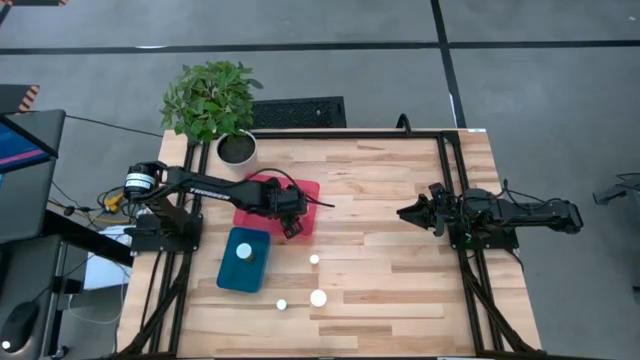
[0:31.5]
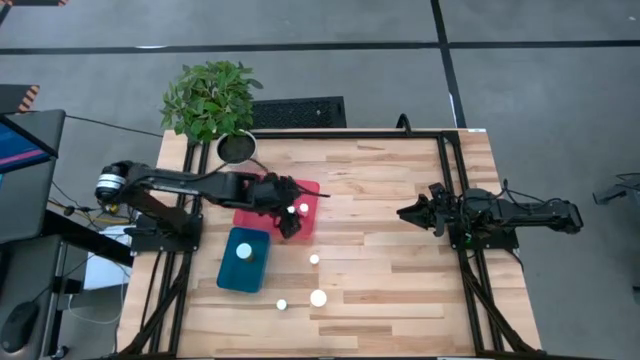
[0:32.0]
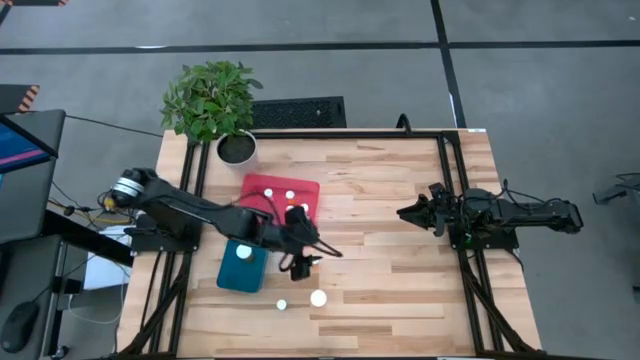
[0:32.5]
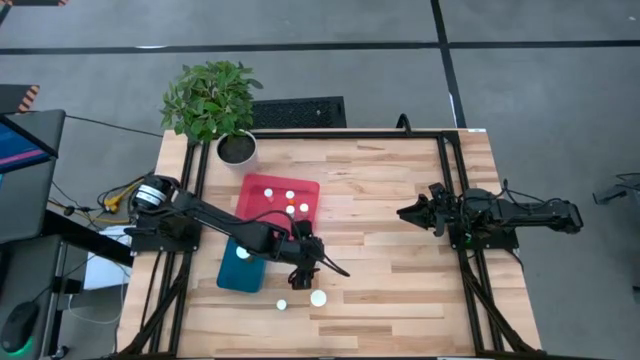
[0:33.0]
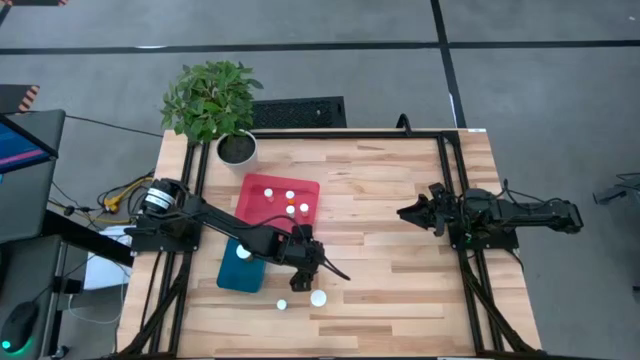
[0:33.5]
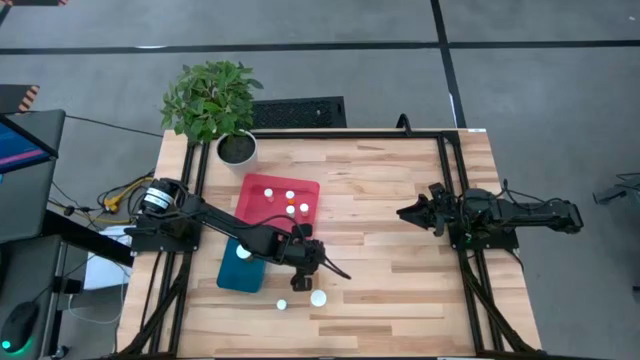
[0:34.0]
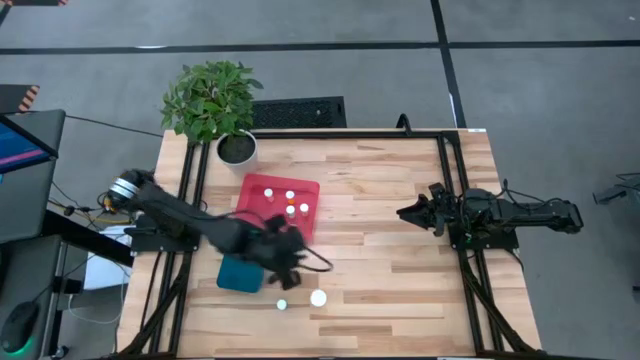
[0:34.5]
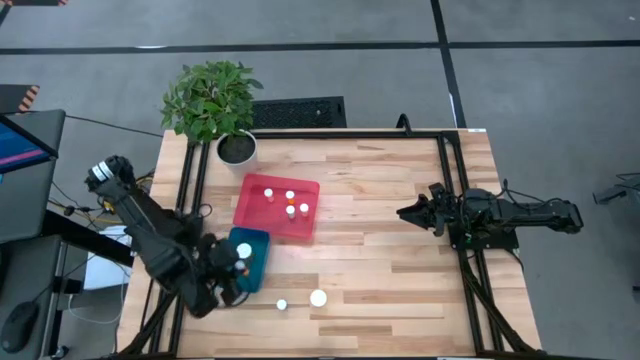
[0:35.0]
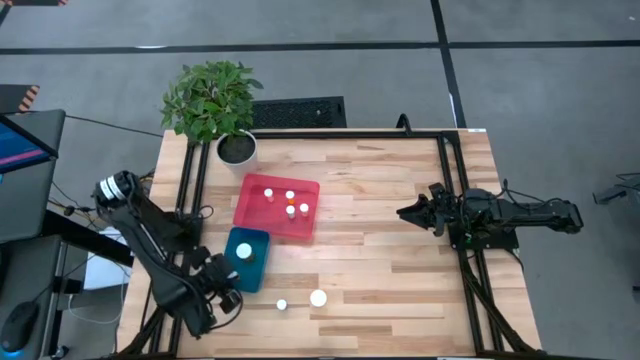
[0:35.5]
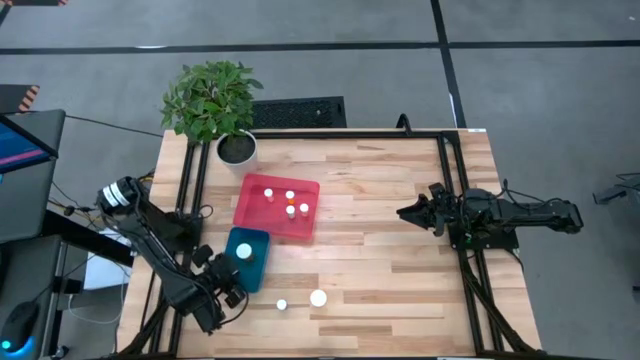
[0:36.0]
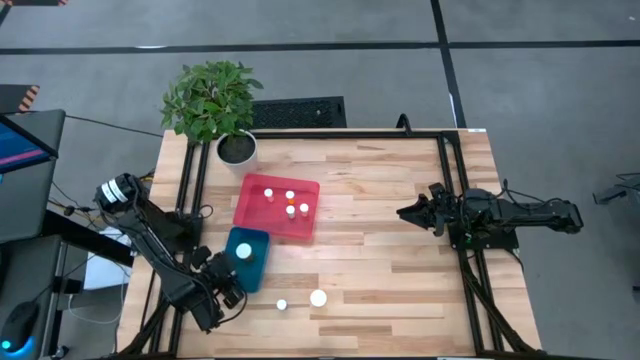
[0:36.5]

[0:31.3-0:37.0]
Task: Pick and place medicine bottles into bin by pill shape (circle, oval)
Put the orange capsule bottle into the blue bin

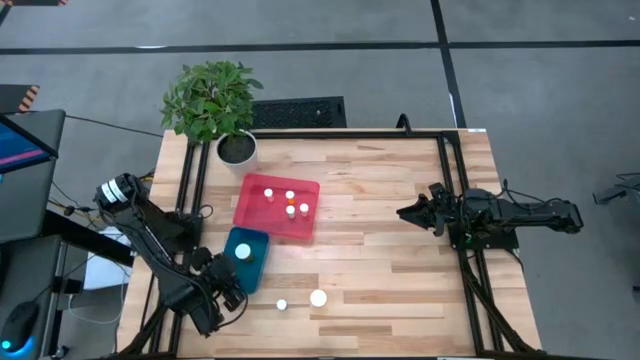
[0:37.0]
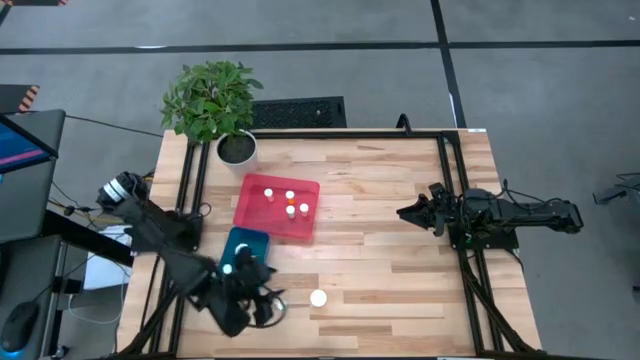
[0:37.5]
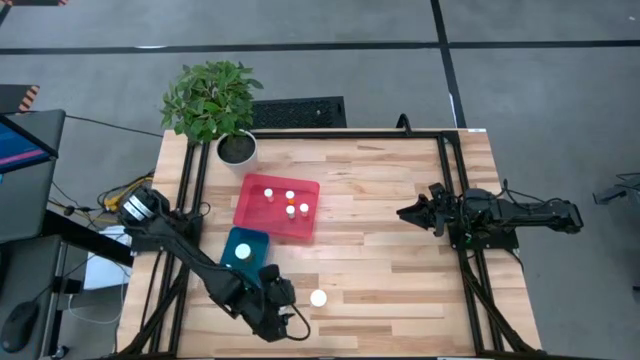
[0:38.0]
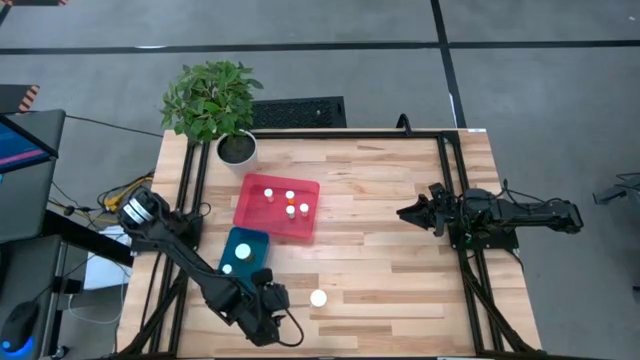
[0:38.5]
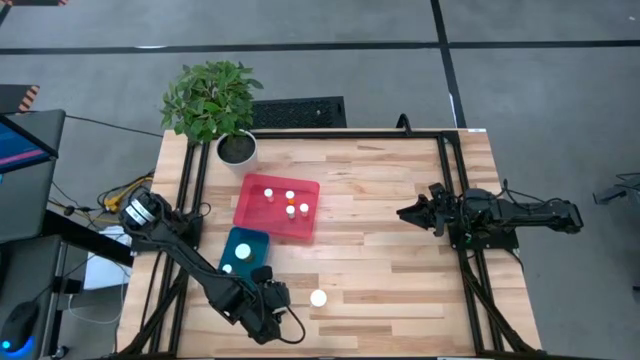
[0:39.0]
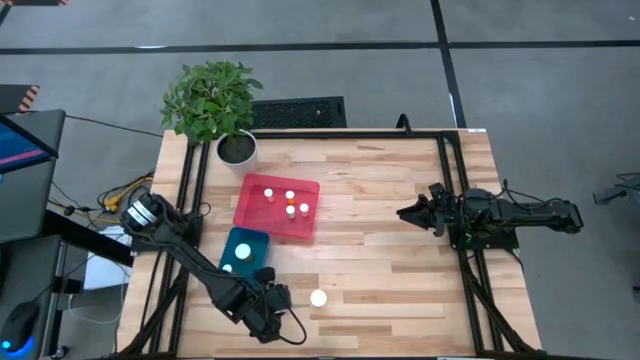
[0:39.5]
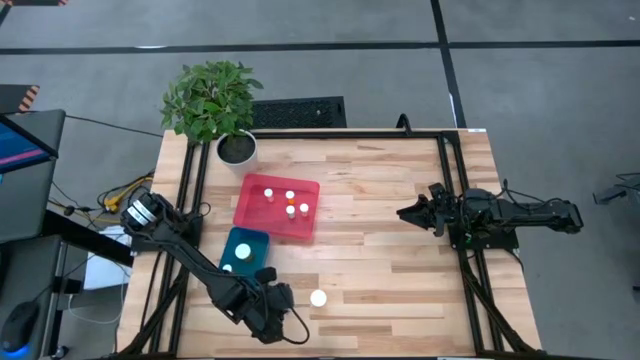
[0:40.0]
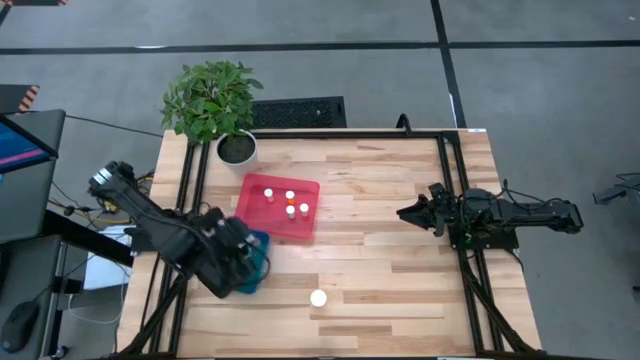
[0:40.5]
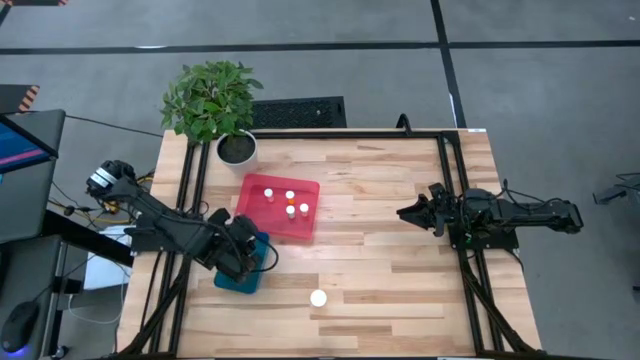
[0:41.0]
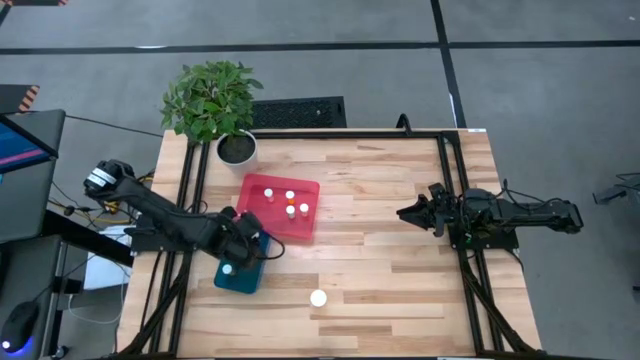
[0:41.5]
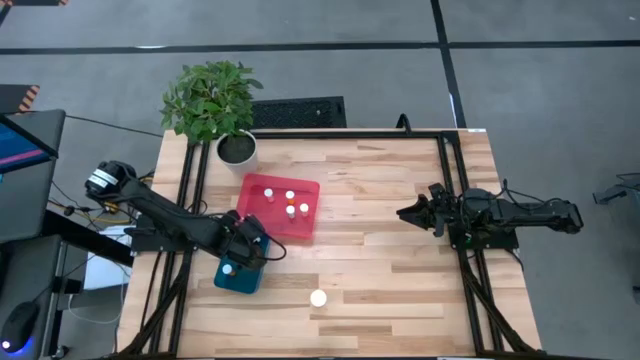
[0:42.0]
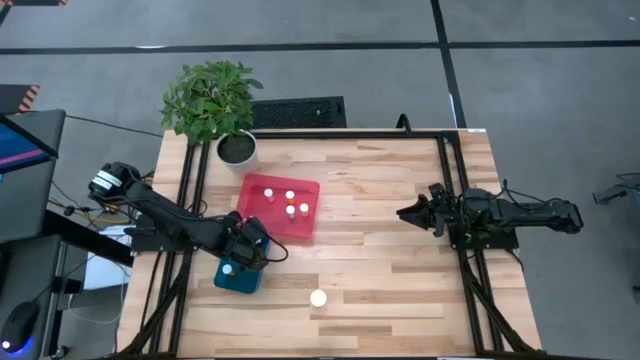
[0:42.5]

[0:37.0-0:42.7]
Put the blue capsule bottle into the blue bin

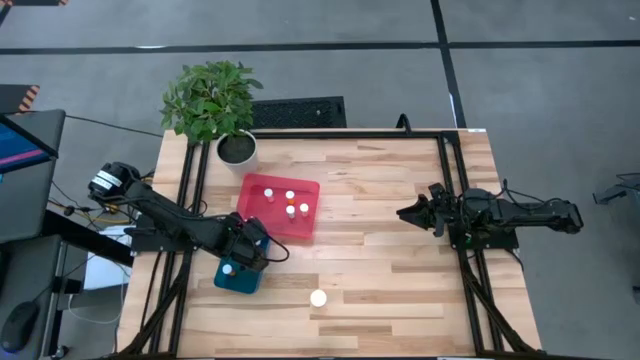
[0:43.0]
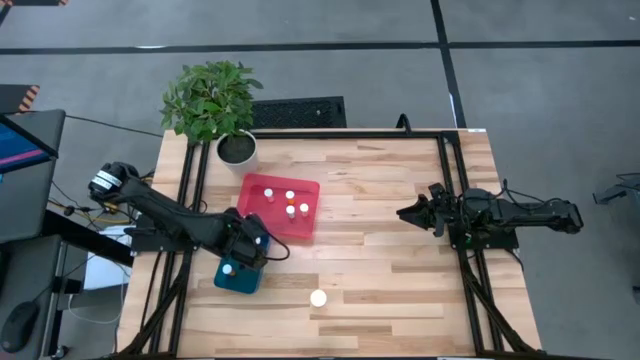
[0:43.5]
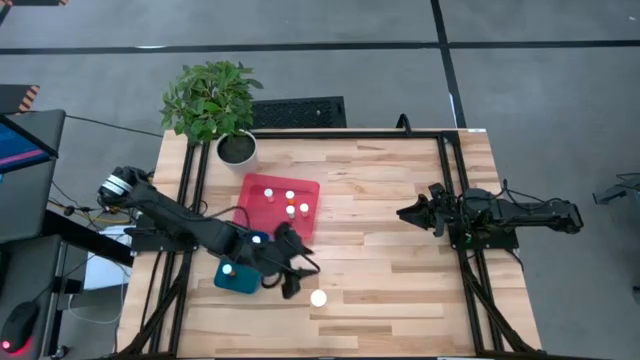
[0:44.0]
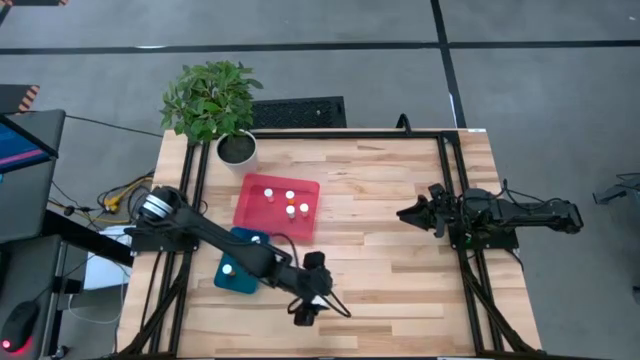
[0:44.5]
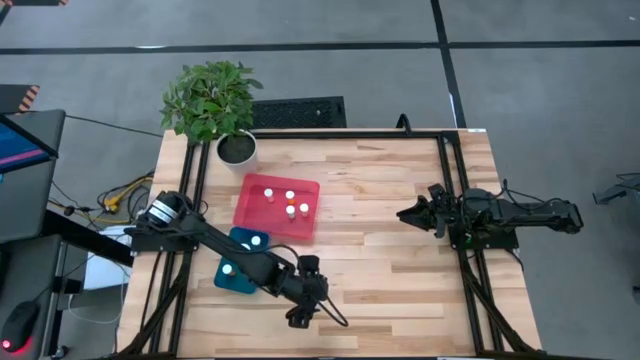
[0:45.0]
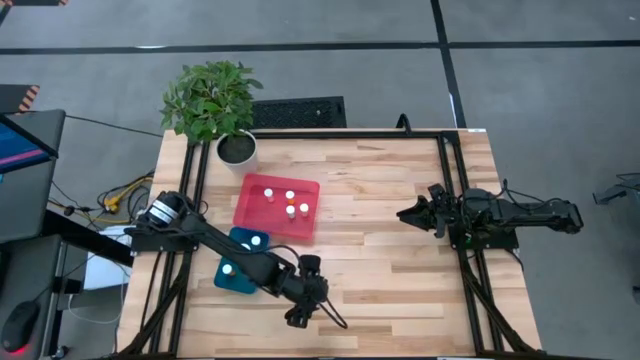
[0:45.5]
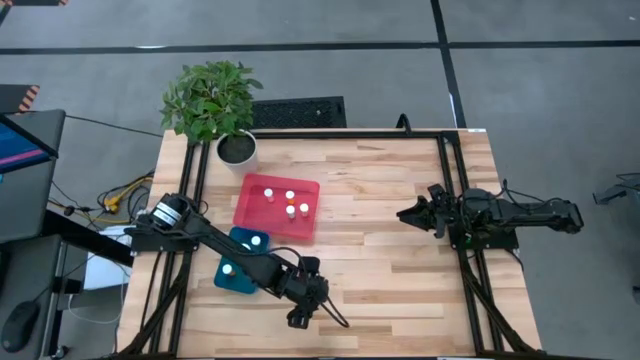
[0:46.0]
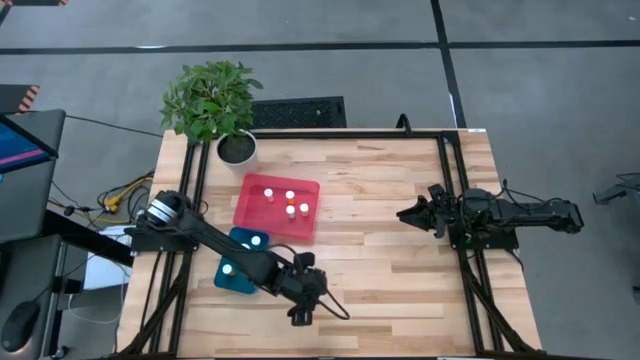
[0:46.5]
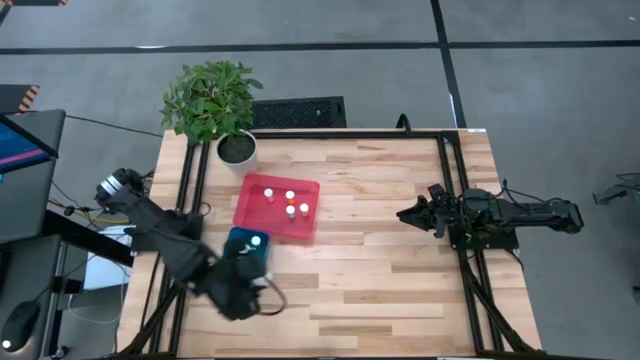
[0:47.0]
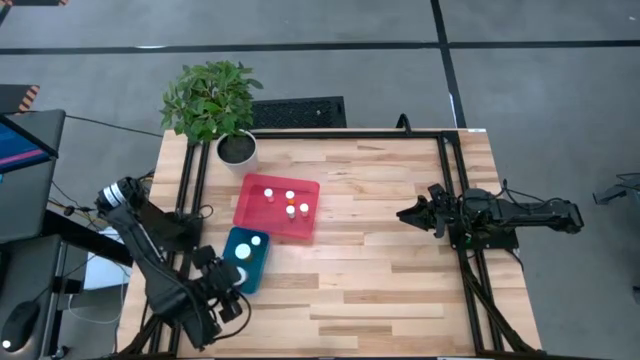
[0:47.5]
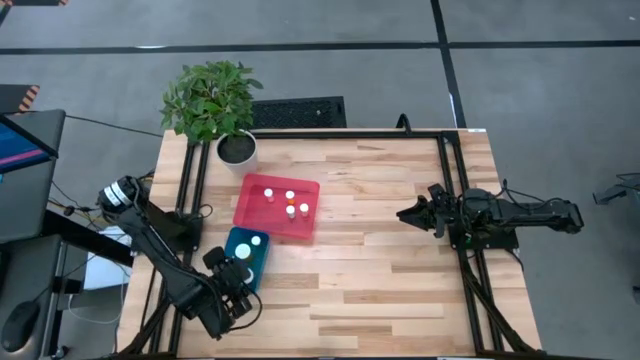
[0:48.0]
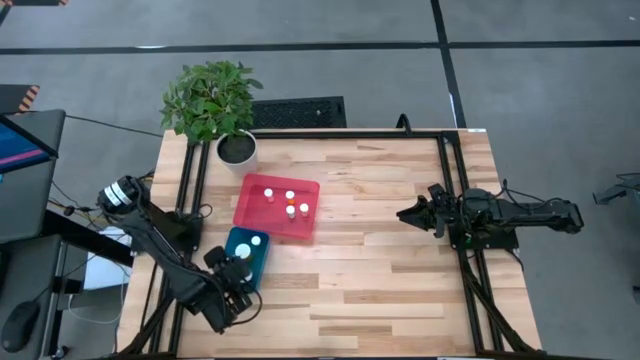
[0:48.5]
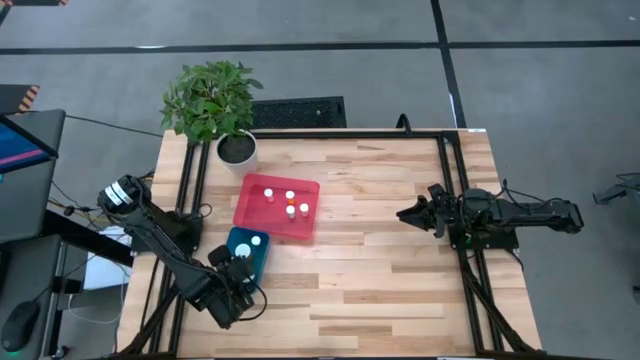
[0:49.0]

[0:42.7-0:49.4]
Put the orange capsule bottle into the blue bin

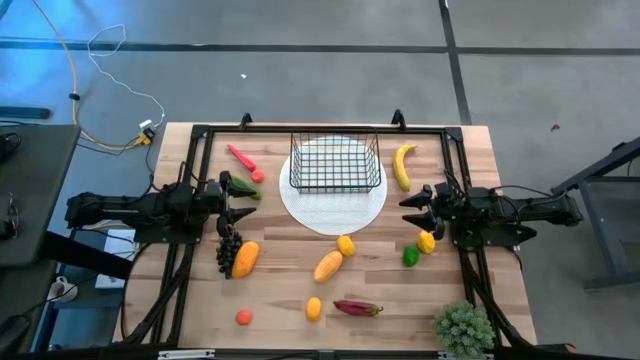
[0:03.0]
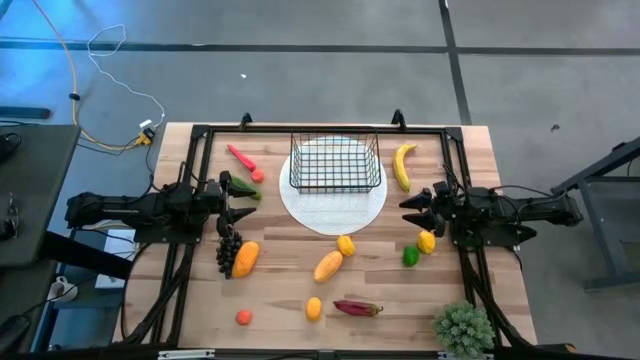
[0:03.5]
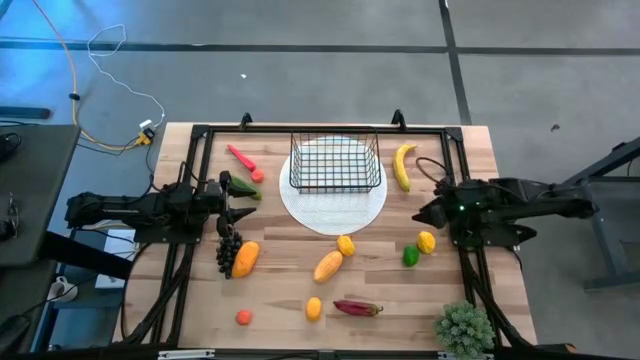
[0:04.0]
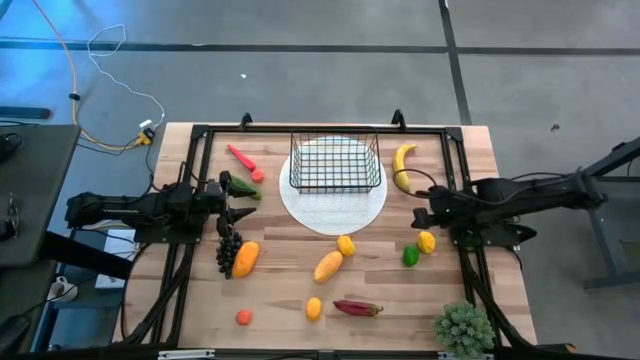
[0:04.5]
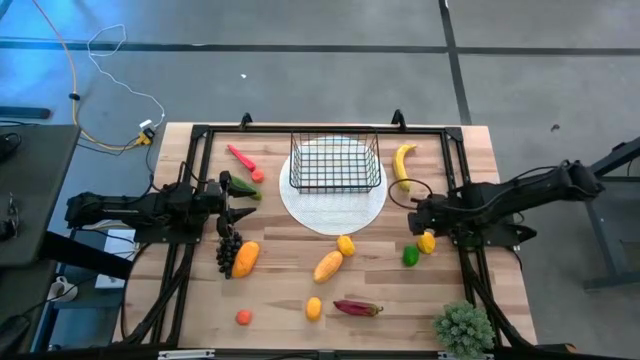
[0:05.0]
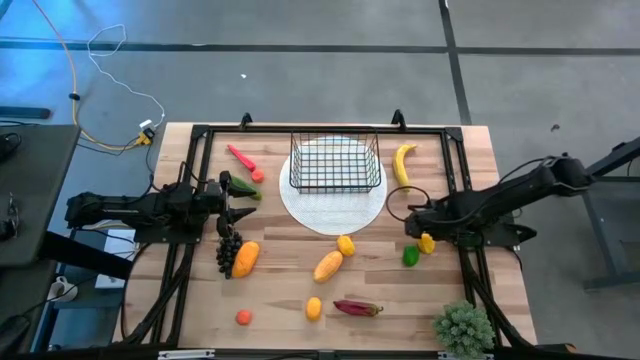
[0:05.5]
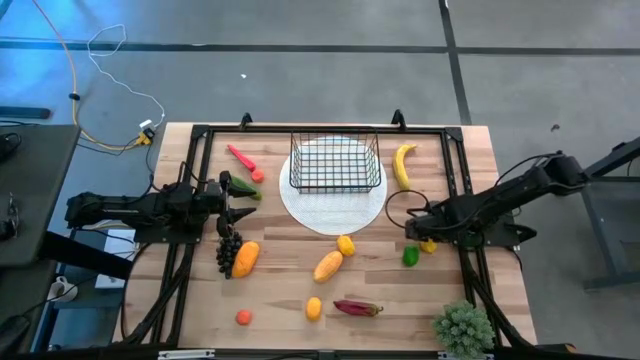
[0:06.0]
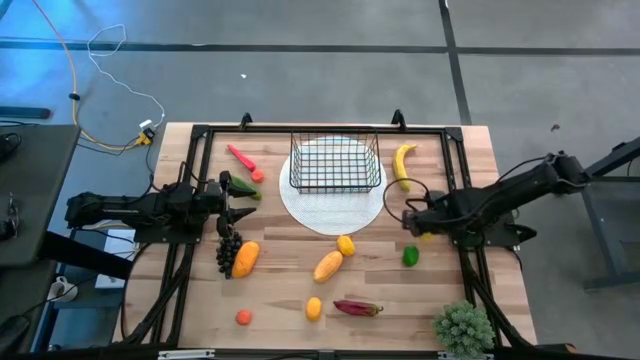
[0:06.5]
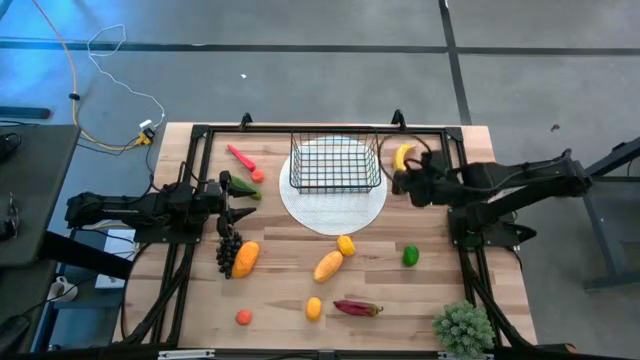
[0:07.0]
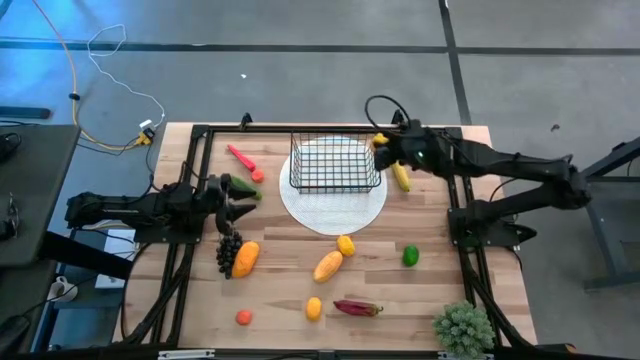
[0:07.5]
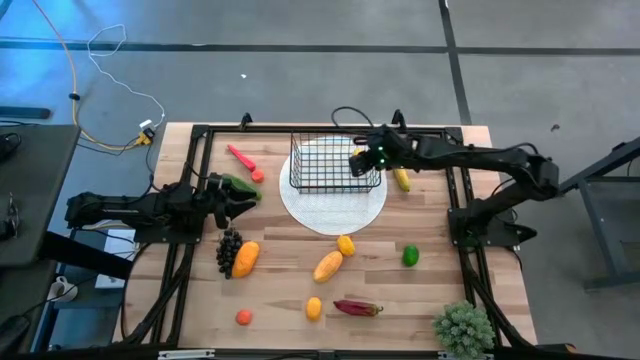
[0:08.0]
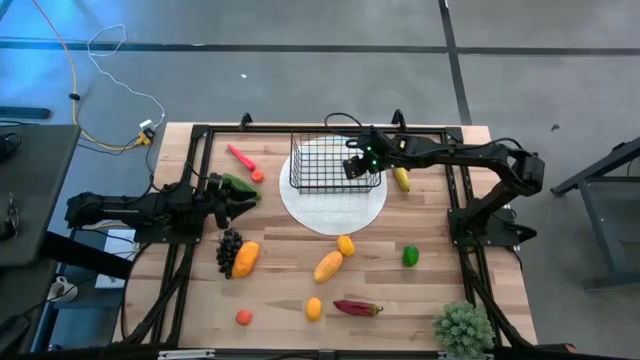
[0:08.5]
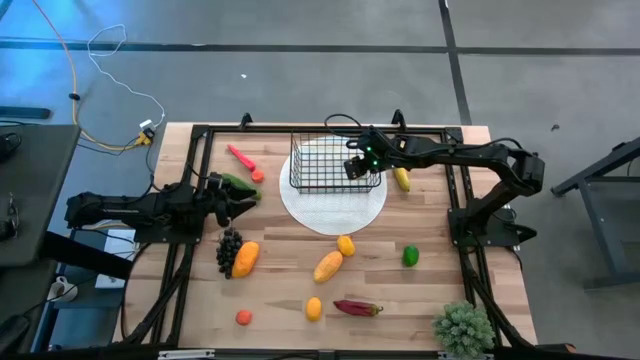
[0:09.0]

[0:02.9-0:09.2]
Task: Build produce basket
Put the right yellow lemon into the black wire basket
